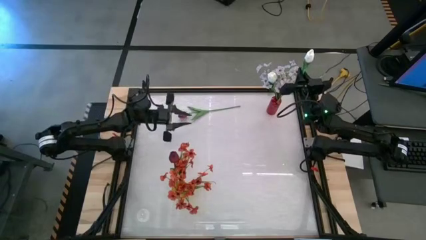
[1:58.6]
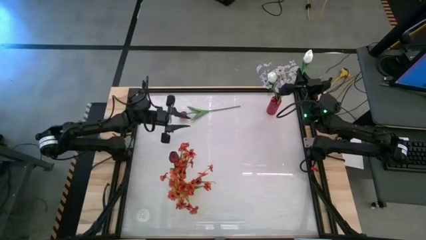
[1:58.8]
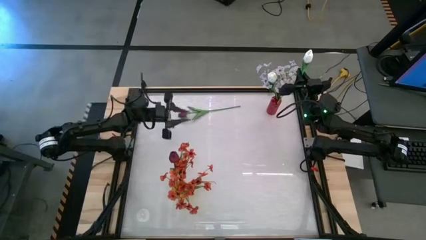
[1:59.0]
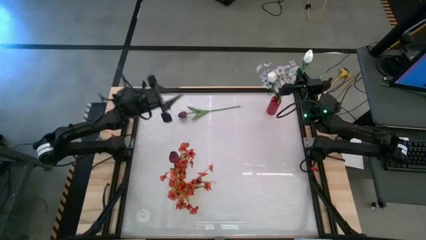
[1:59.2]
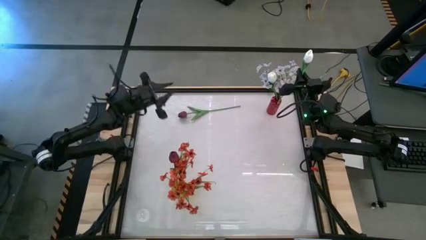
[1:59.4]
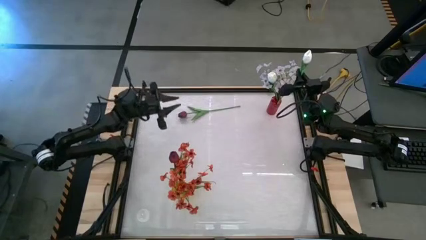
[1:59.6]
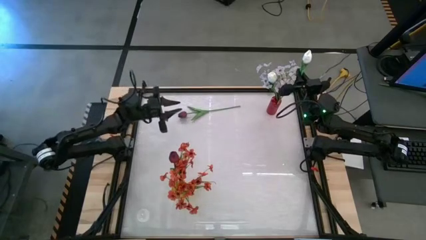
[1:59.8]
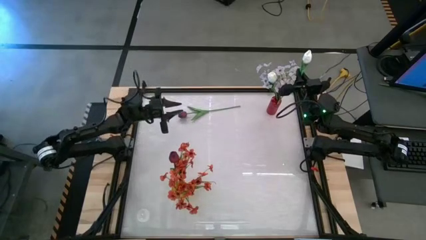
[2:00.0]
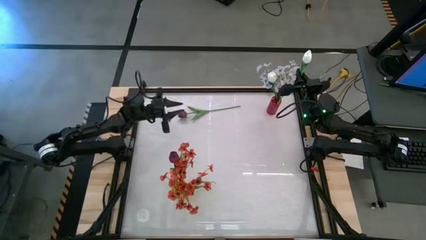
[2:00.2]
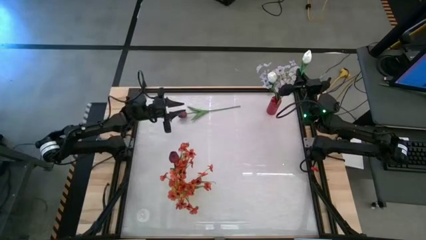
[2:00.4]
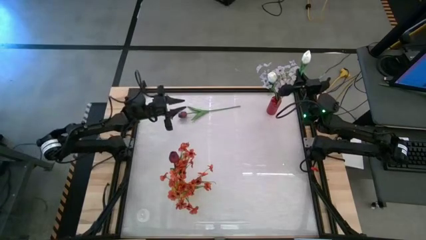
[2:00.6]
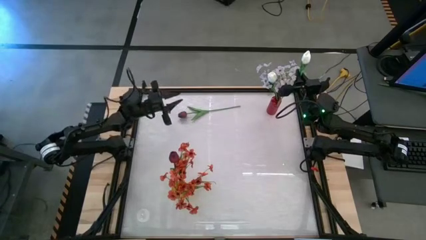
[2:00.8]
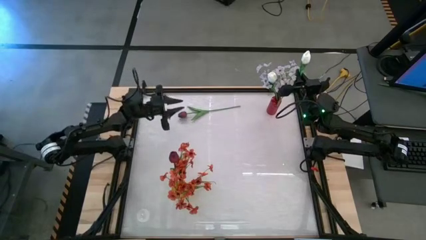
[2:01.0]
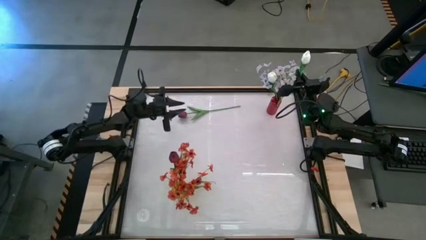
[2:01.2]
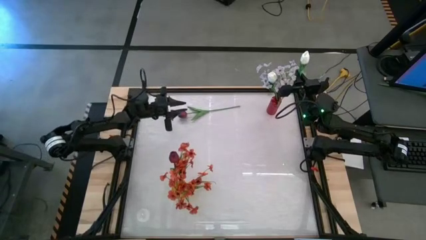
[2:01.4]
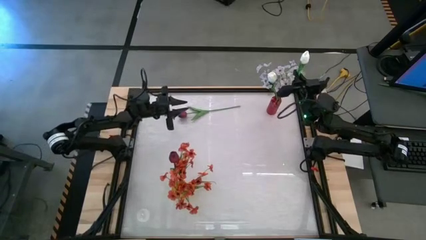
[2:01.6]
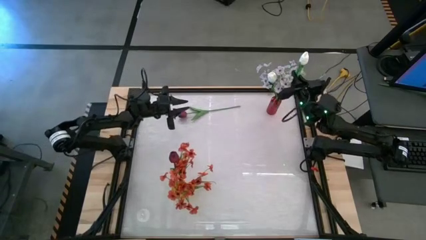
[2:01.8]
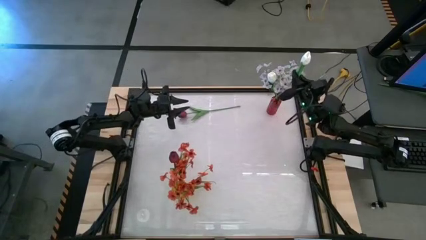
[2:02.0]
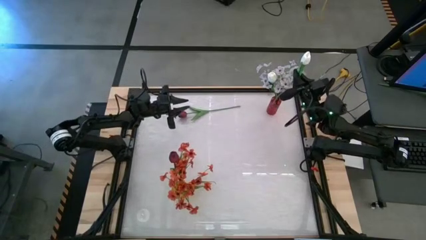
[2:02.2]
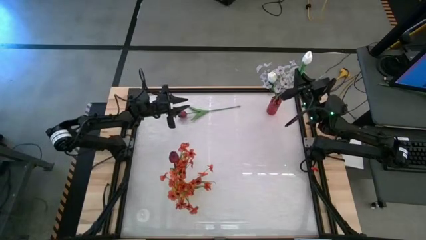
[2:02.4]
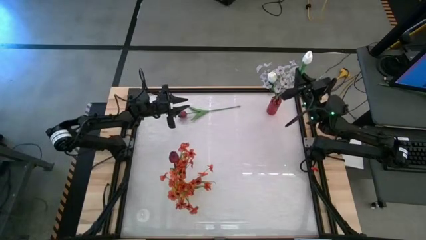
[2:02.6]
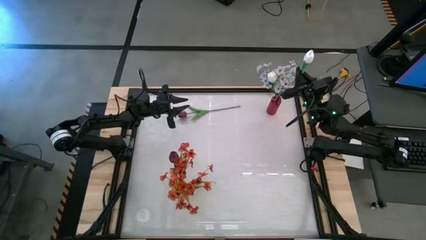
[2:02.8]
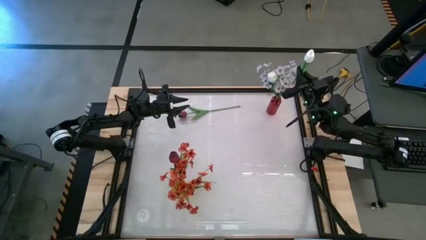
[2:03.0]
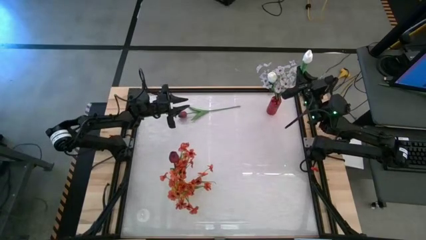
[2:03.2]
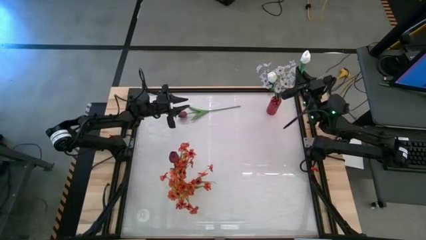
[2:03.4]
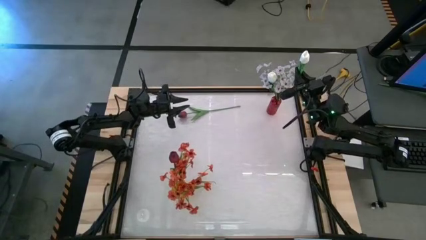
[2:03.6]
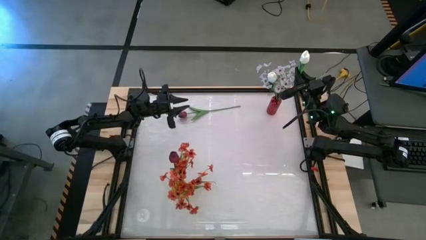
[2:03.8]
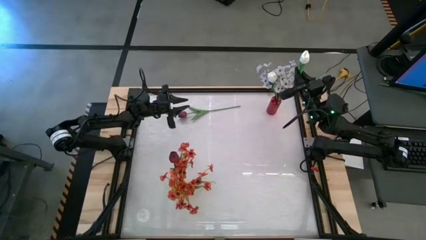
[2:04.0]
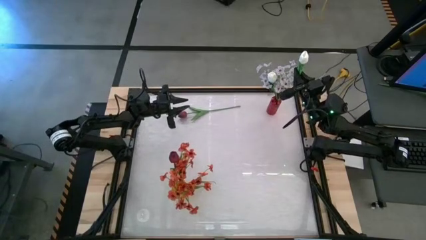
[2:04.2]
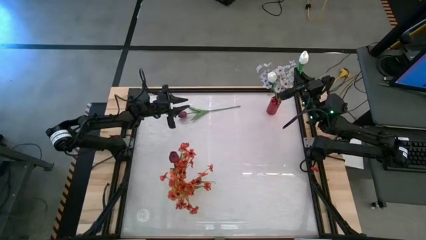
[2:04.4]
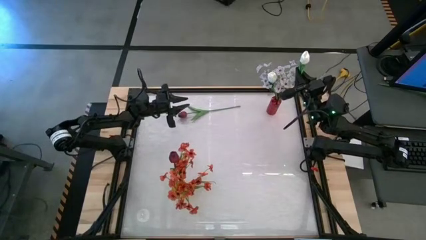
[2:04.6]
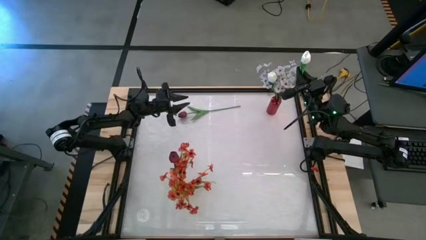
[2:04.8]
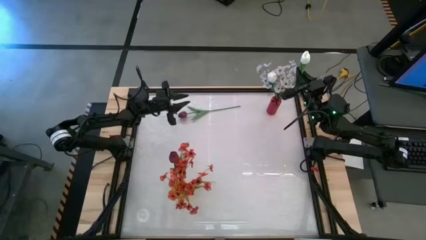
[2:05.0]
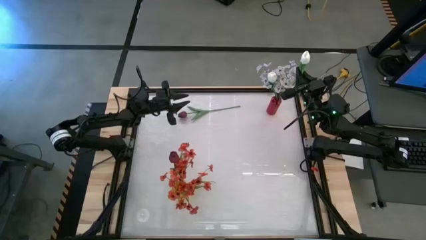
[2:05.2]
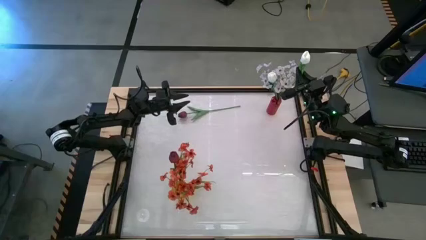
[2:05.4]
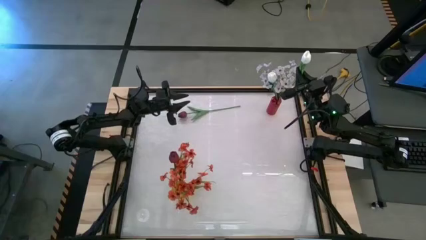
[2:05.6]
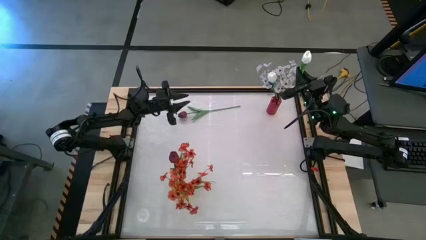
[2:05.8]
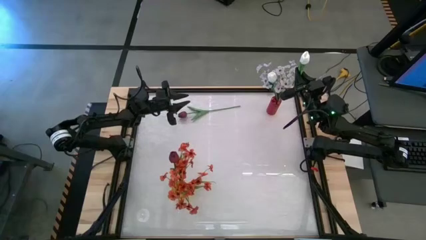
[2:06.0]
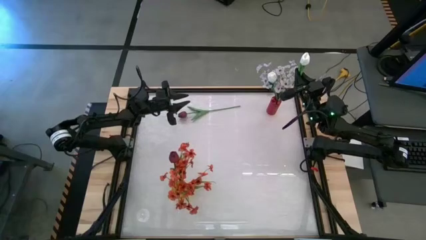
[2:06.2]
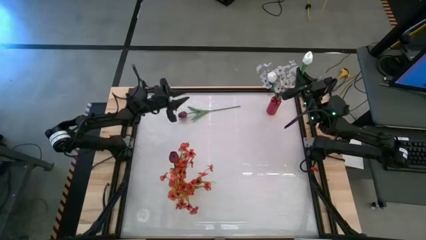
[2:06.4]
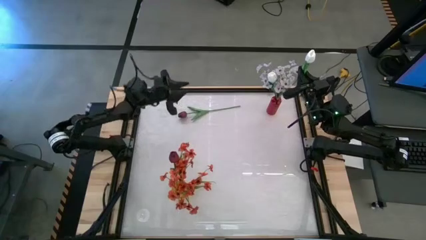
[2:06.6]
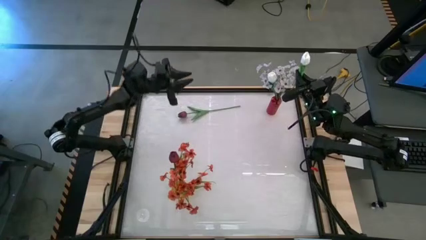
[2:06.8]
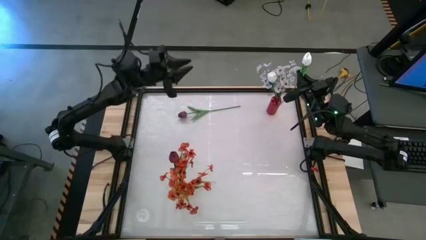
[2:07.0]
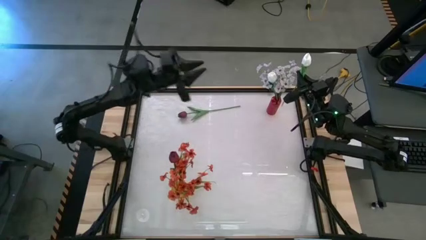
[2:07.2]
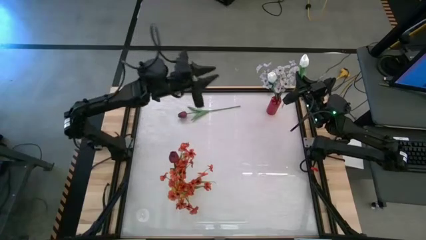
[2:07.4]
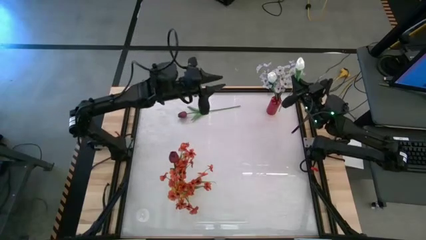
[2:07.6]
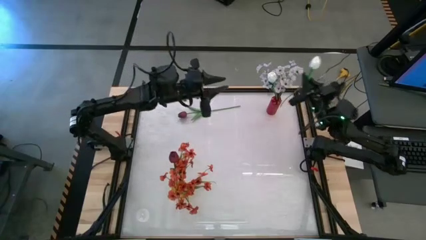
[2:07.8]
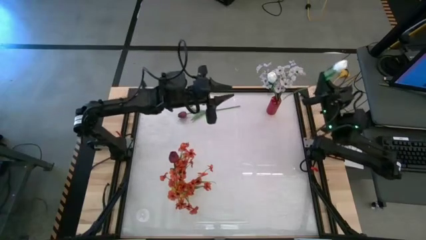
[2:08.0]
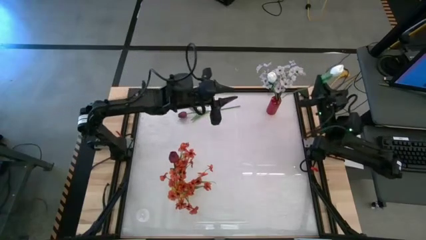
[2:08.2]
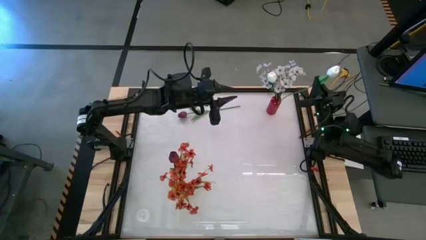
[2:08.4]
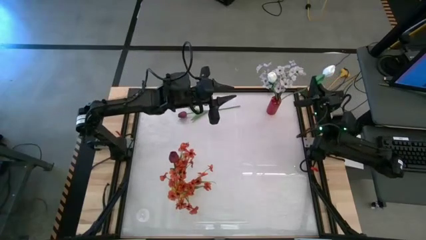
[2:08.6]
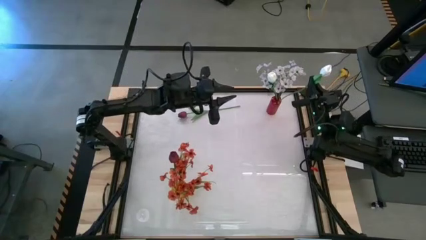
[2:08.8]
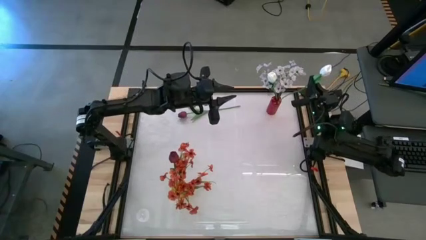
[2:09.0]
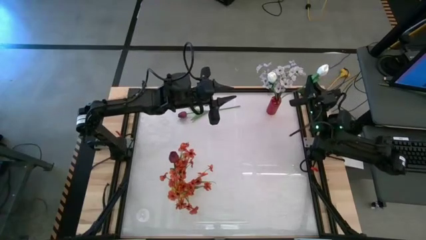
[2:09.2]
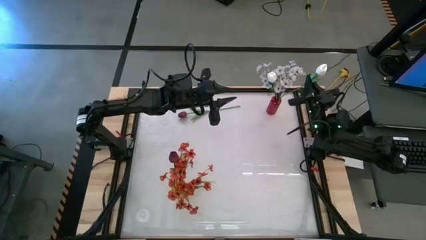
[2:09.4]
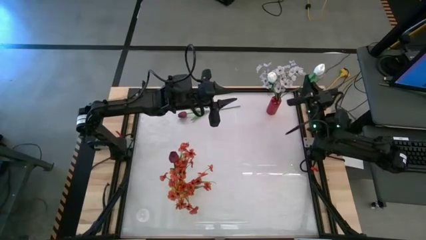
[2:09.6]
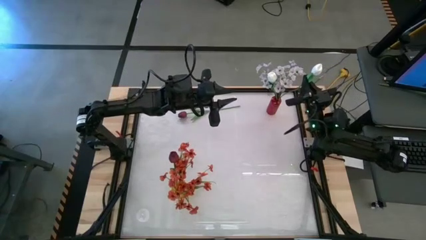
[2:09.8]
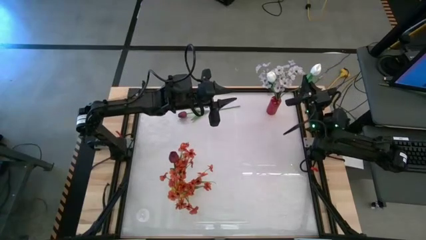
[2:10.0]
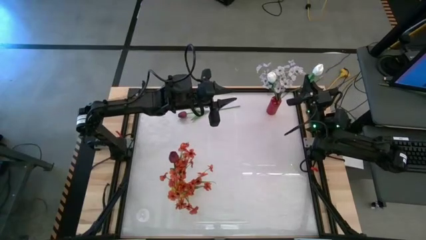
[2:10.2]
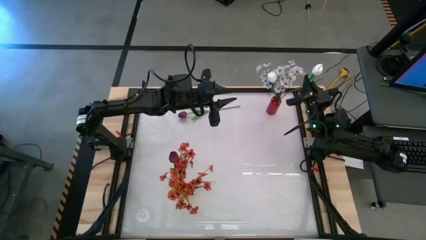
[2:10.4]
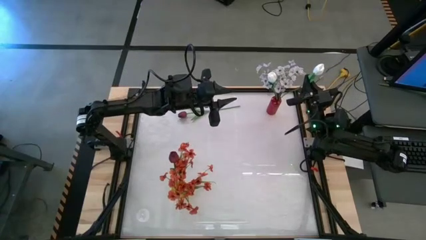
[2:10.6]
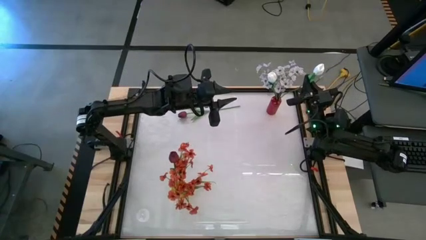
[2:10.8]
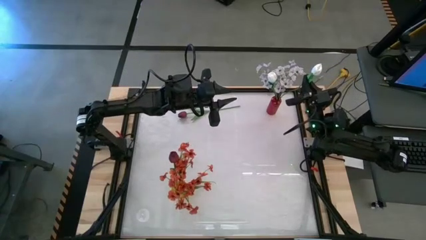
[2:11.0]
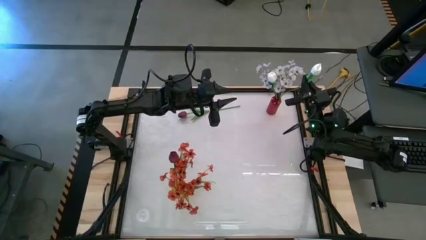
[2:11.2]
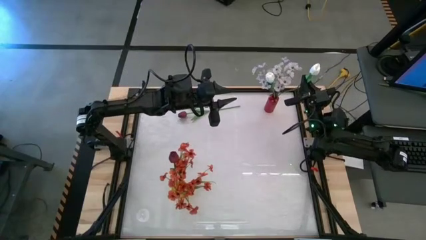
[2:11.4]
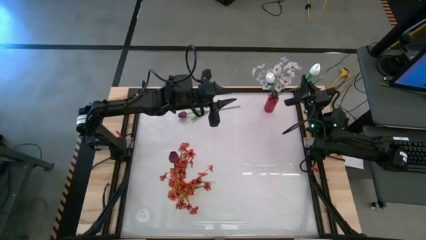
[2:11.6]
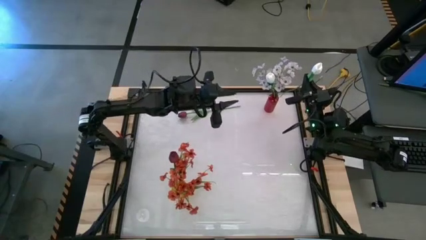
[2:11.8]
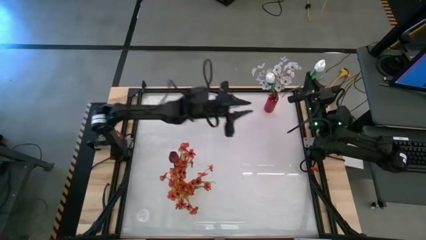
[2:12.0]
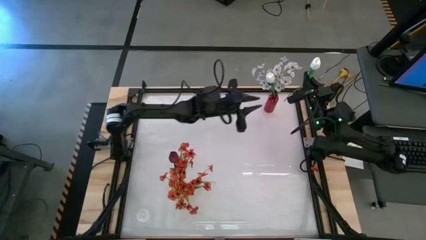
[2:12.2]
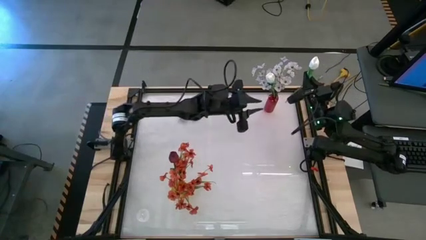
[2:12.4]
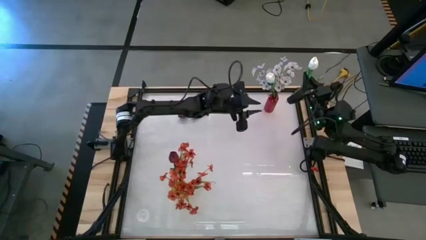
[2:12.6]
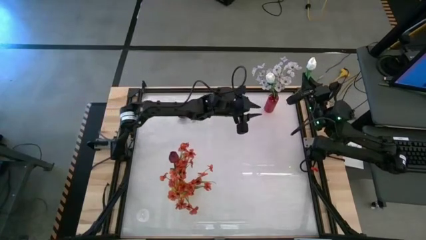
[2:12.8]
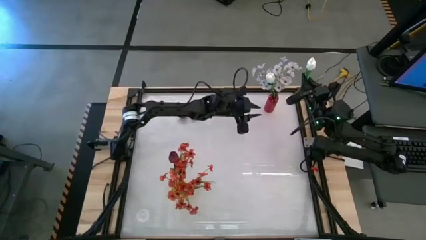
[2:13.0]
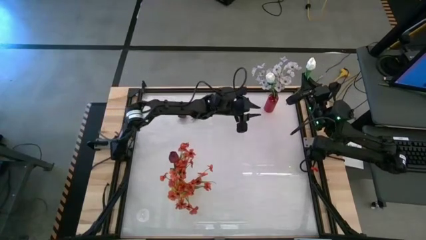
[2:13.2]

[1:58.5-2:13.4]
Task: Sort flowers into vase by color
Put the white tulip into the red vase
